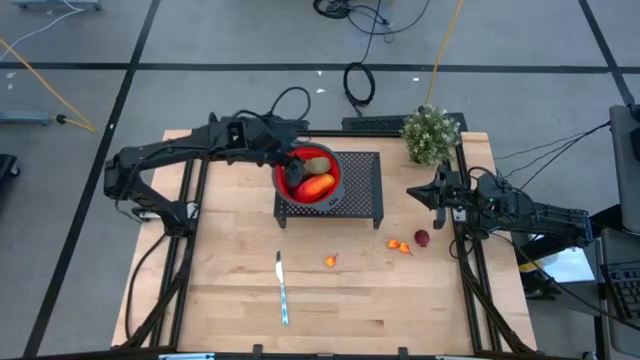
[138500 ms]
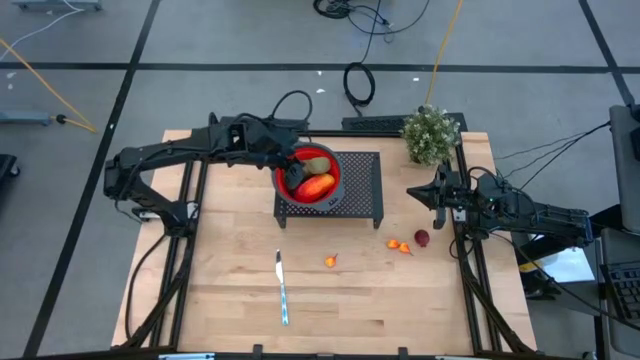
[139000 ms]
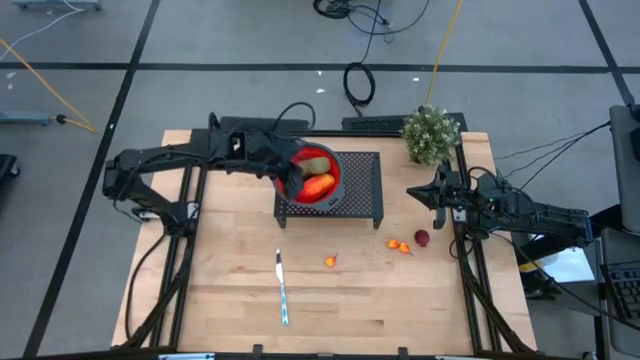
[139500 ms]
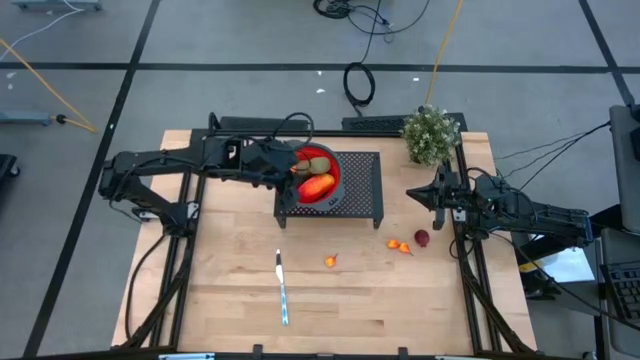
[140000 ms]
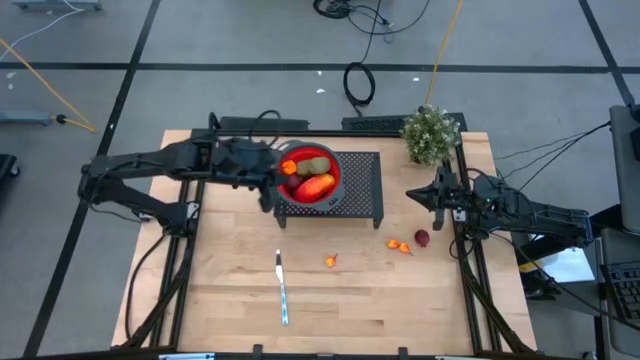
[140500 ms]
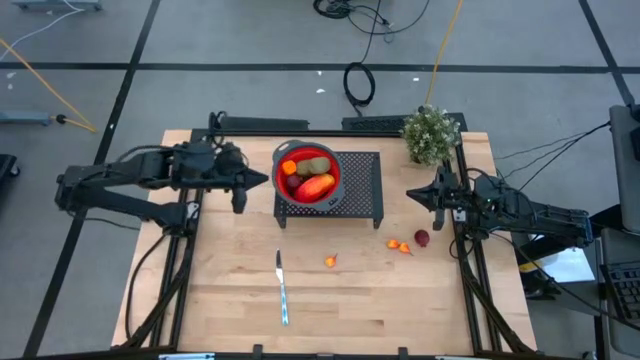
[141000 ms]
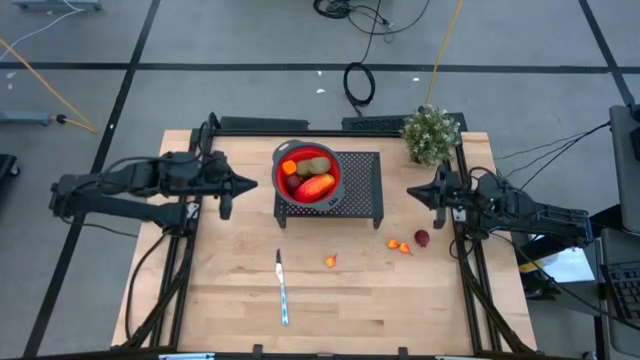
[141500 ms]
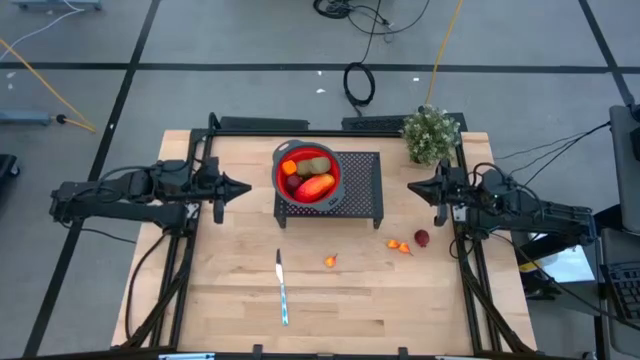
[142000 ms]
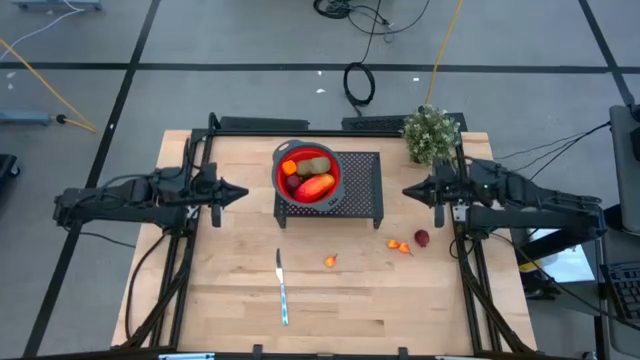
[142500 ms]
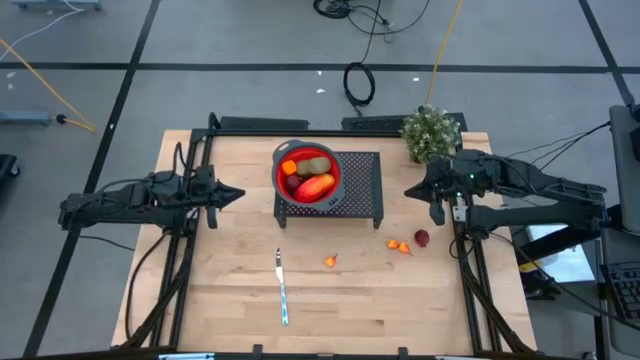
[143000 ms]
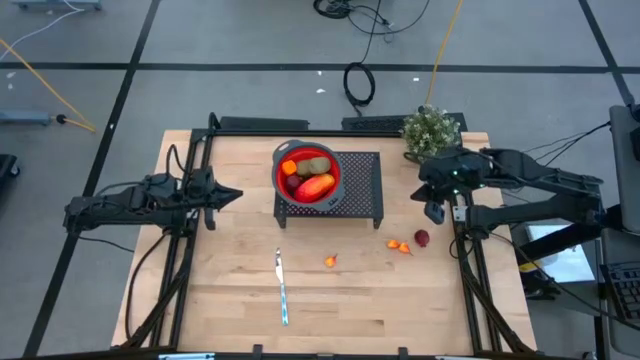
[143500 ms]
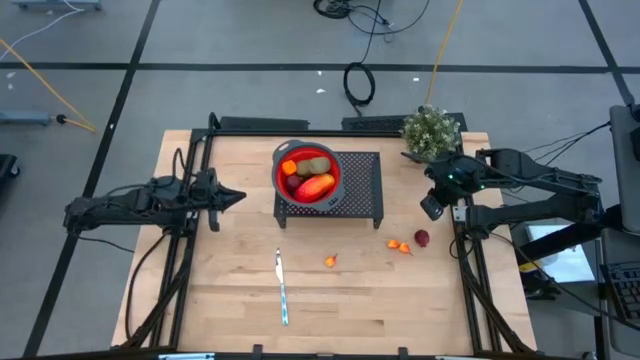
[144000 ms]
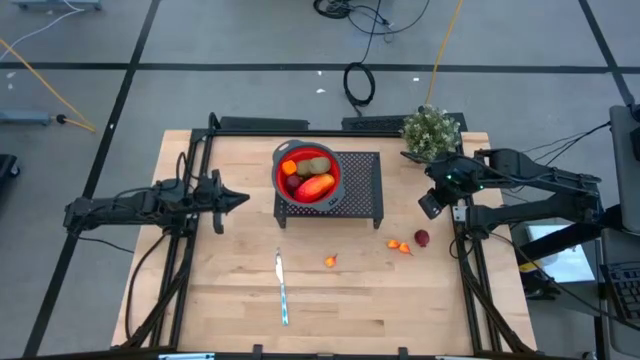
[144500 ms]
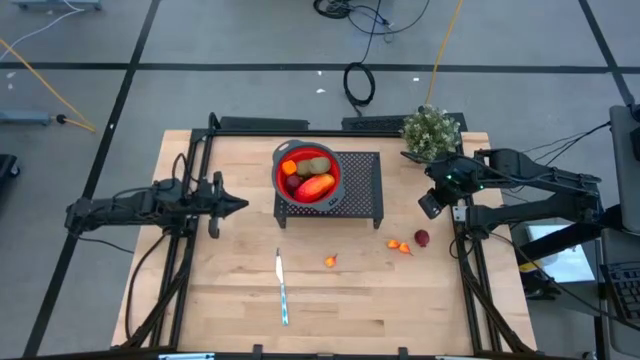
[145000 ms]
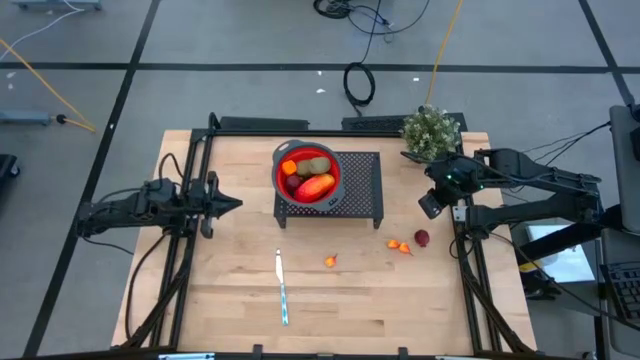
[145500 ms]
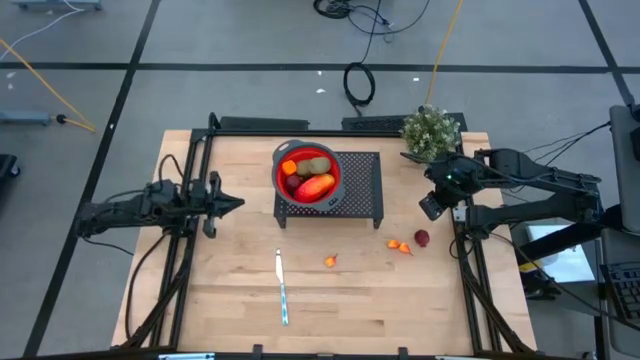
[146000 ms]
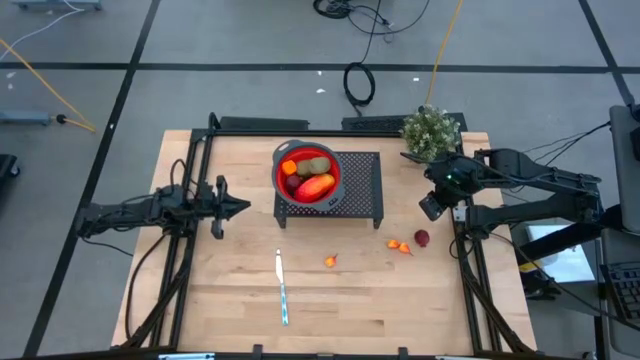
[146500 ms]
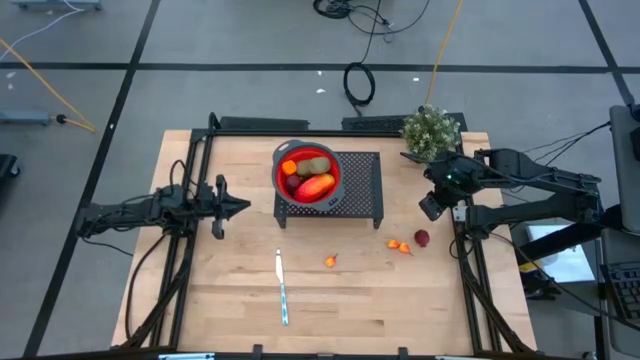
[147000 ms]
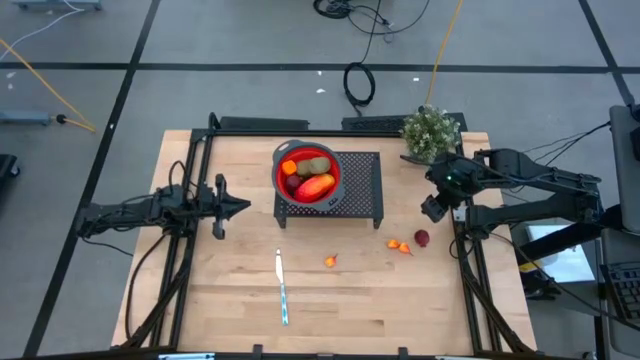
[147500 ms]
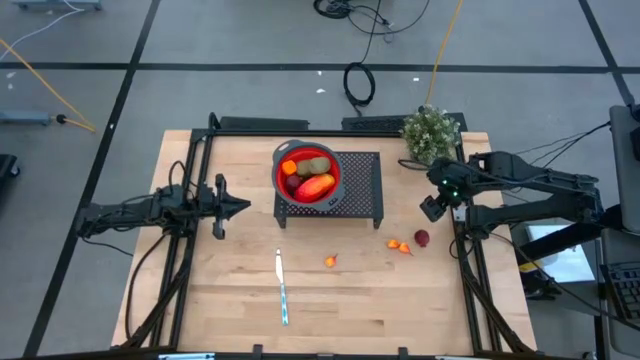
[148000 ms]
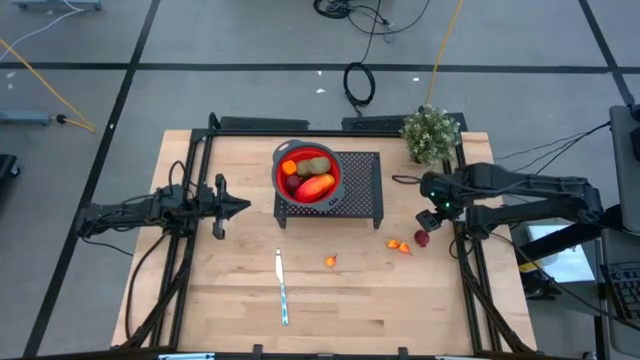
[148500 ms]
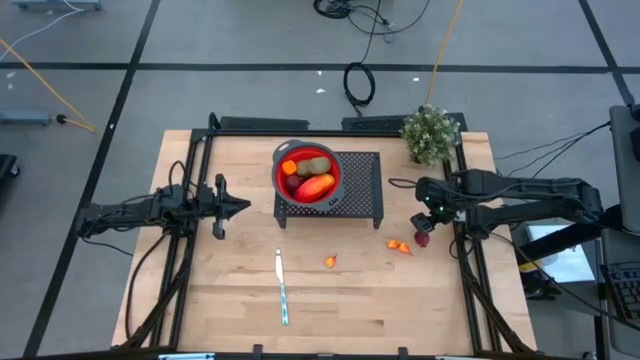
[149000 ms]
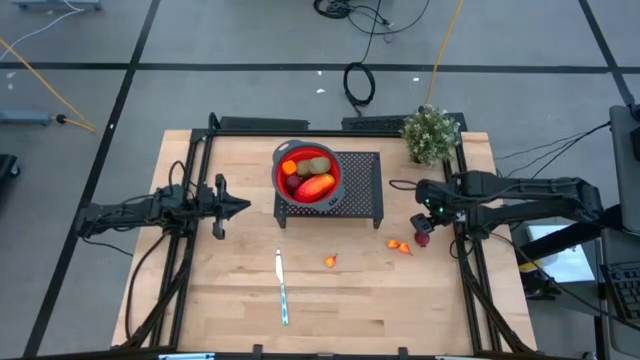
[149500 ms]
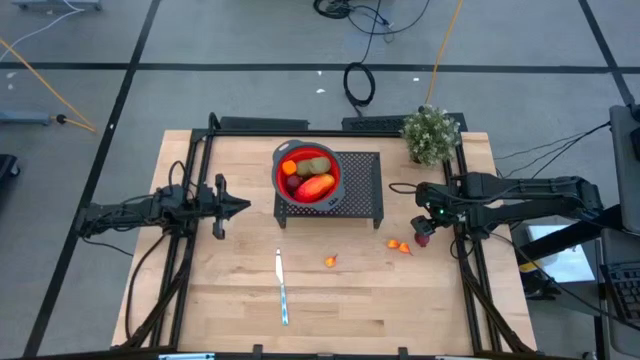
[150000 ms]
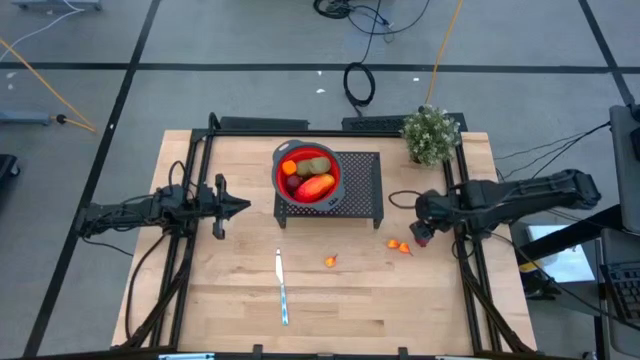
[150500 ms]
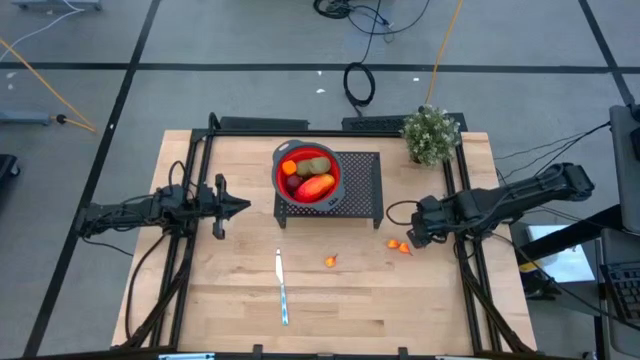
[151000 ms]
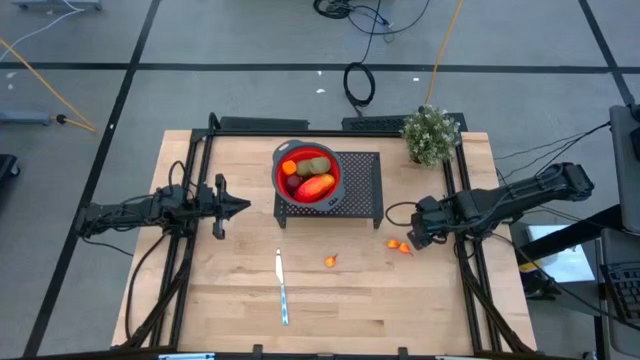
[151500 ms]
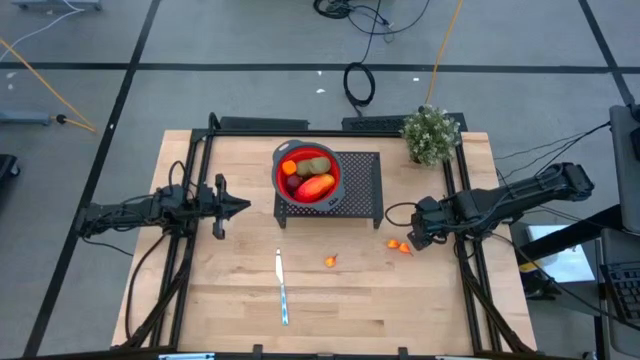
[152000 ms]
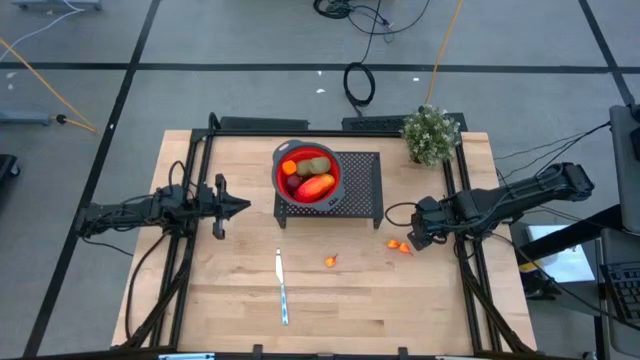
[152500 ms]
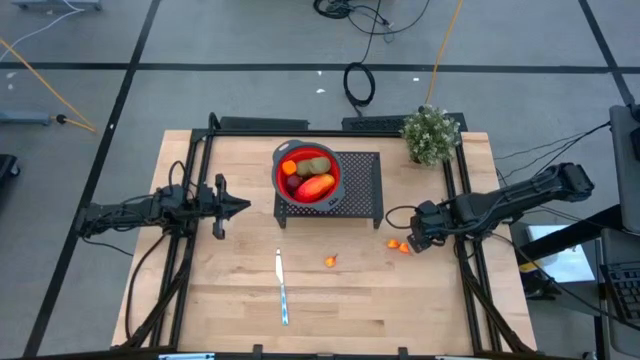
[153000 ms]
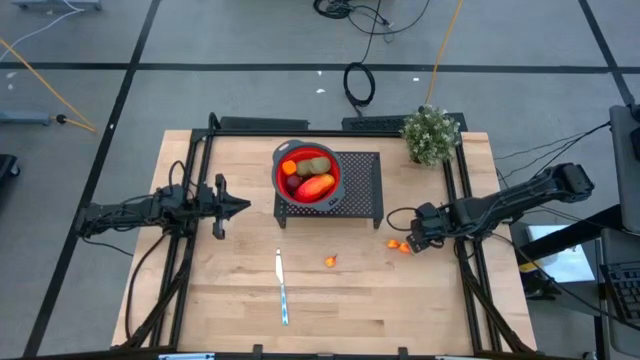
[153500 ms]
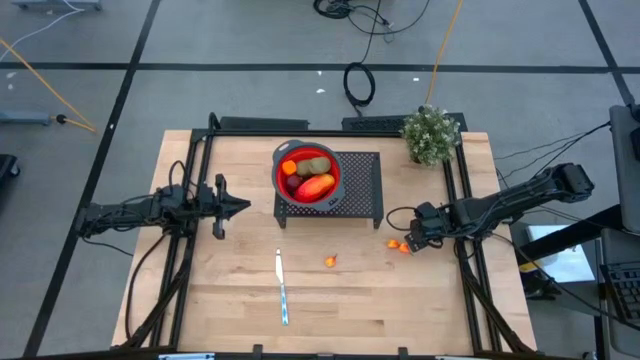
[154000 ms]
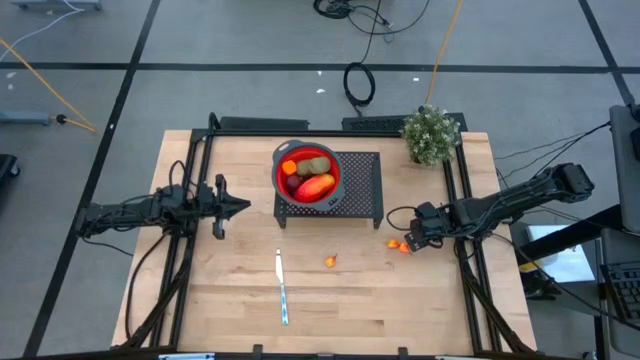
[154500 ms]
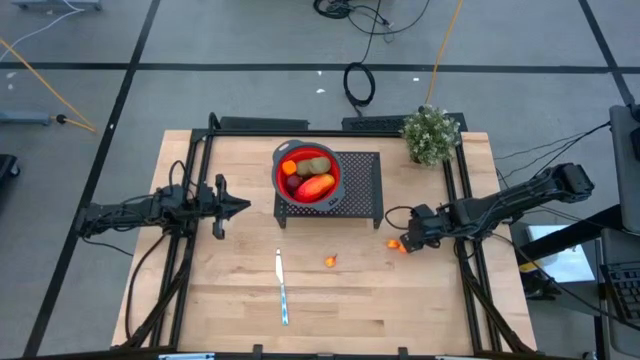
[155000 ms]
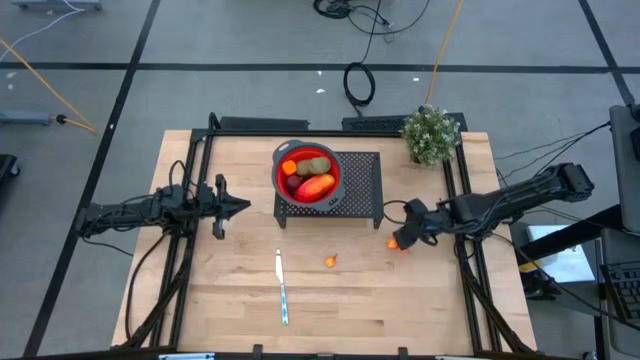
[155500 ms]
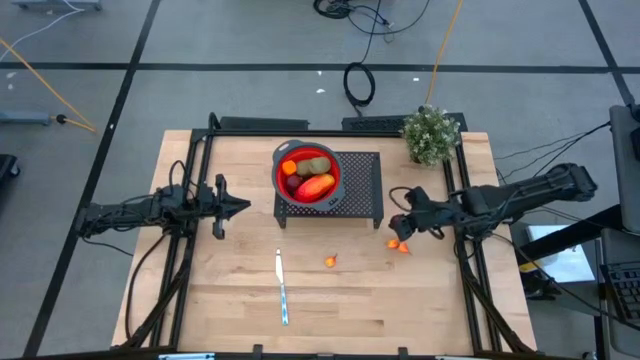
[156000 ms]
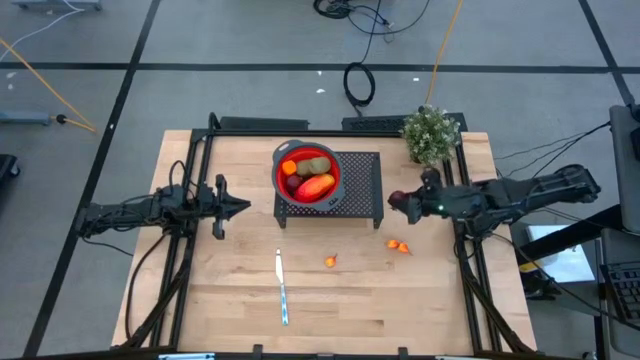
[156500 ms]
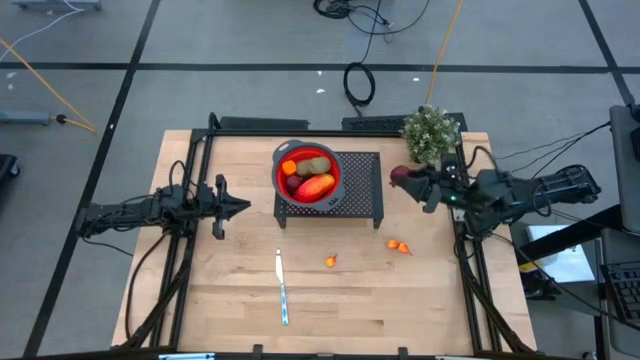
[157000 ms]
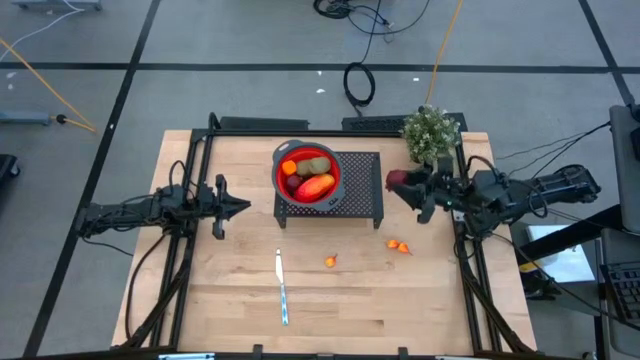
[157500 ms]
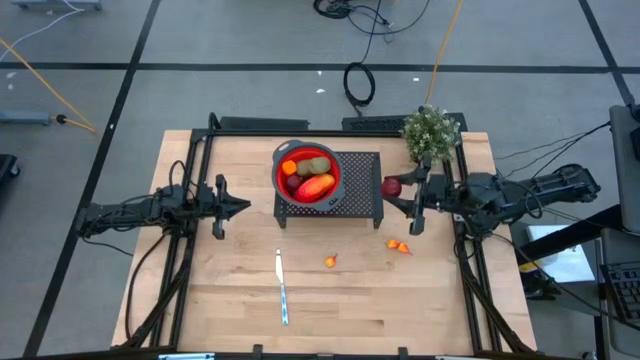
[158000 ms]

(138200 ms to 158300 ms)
Task: Pick & Place Fruit
Put the pomegranate into the strainer on the shelf

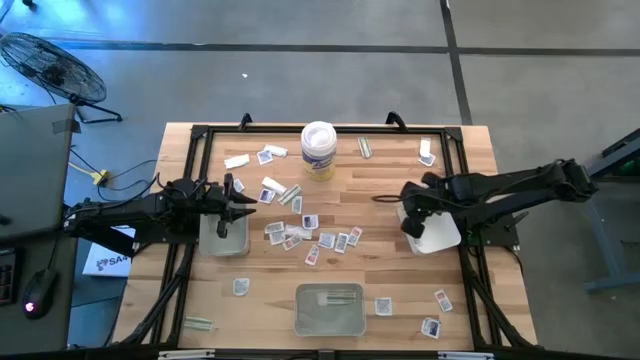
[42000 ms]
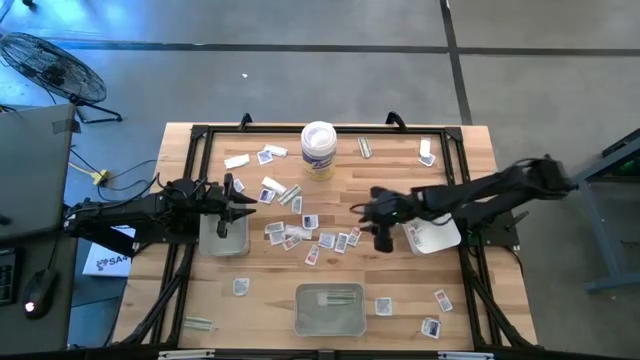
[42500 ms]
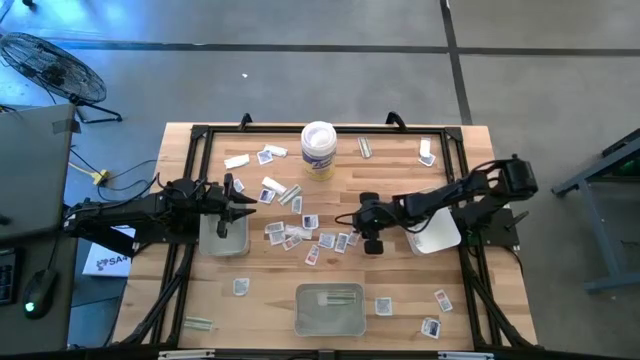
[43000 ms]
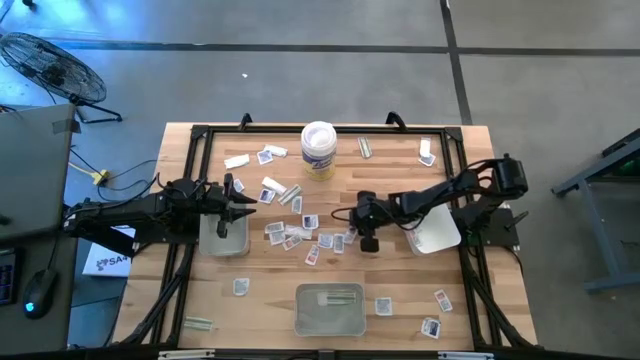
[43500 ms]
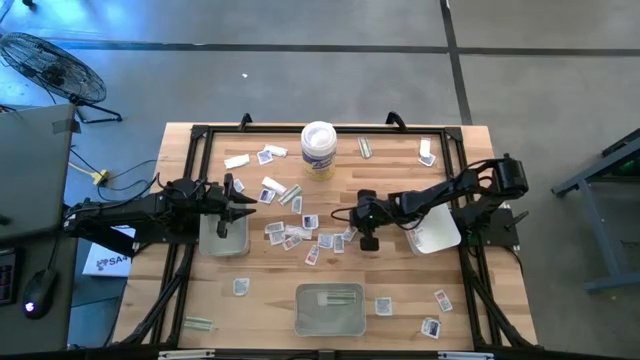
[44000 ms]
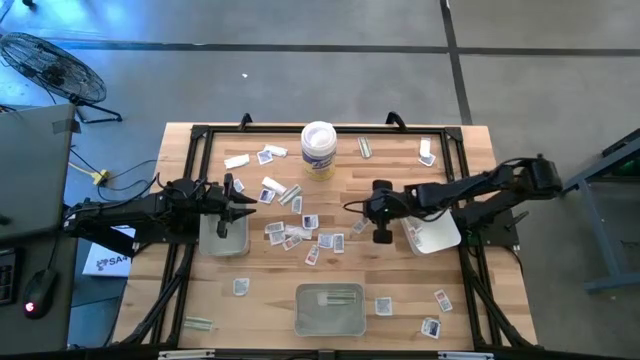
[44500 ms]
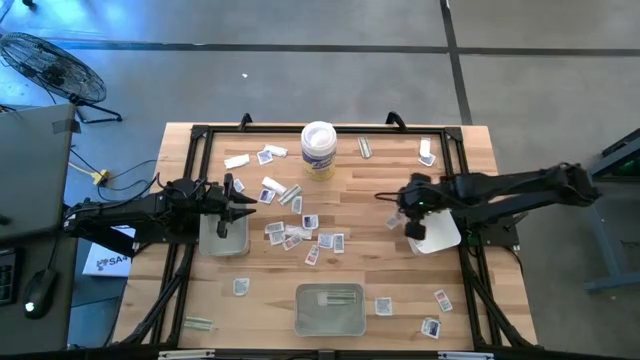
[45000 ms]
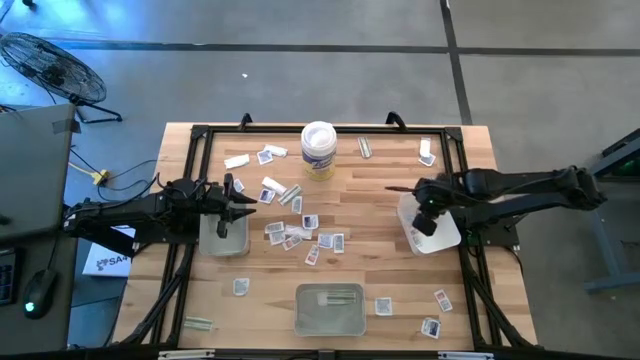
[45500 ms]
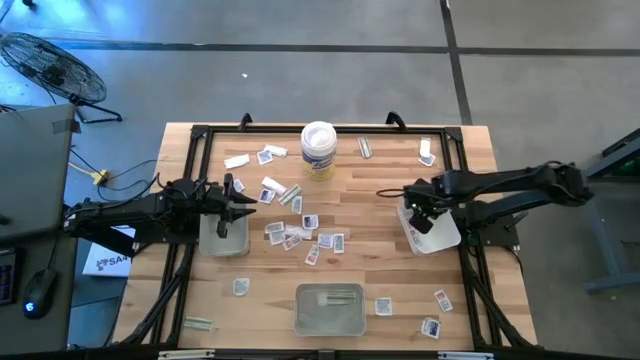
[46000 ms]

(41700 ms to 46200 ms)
Task: Pick & Place First Aid Supplies
Put the orange ointment pack into the white bin
